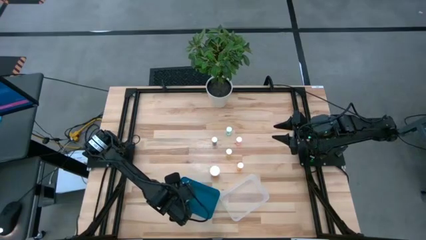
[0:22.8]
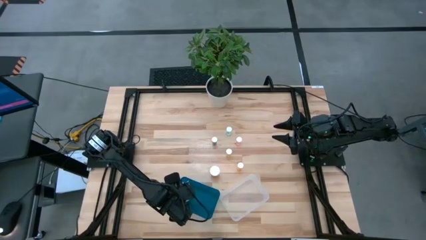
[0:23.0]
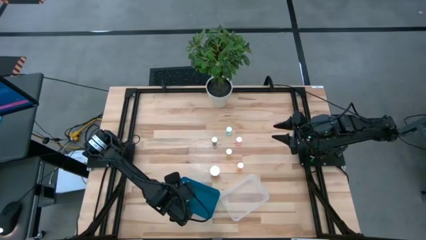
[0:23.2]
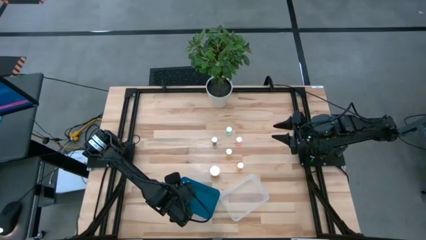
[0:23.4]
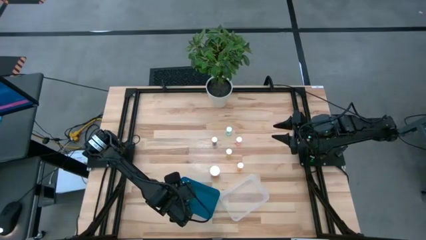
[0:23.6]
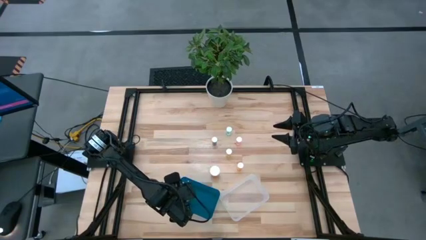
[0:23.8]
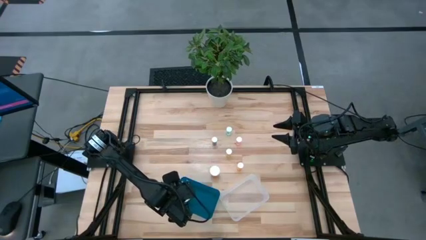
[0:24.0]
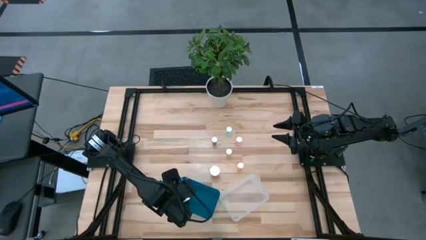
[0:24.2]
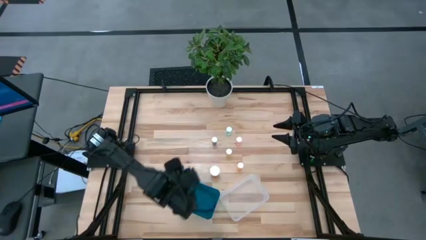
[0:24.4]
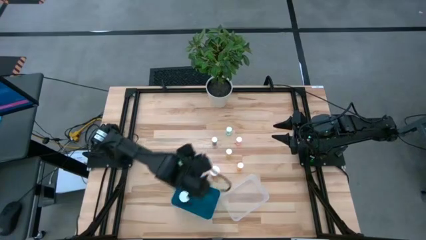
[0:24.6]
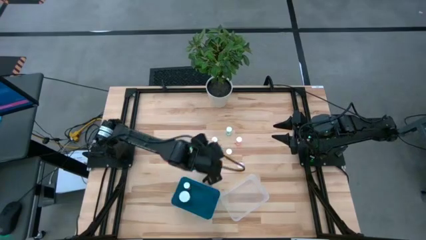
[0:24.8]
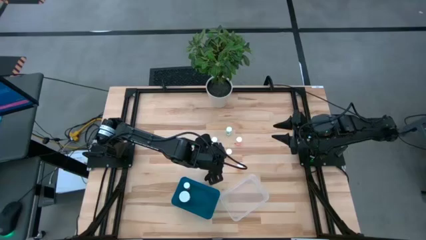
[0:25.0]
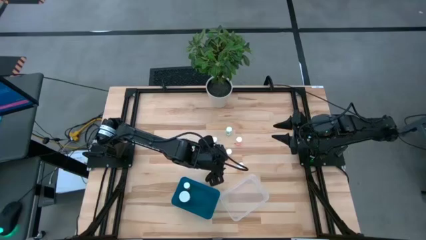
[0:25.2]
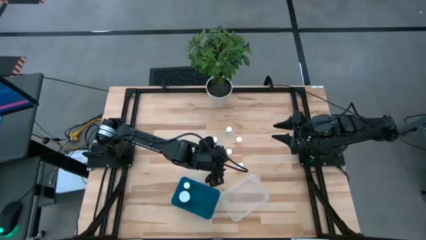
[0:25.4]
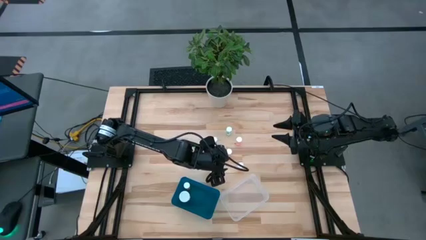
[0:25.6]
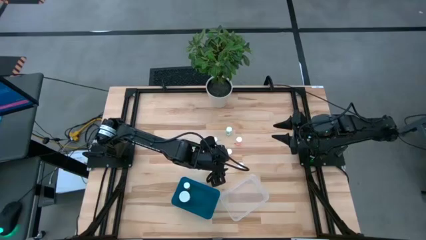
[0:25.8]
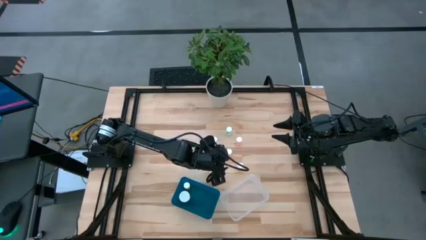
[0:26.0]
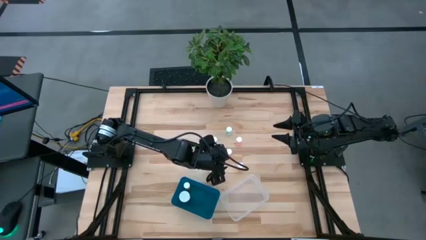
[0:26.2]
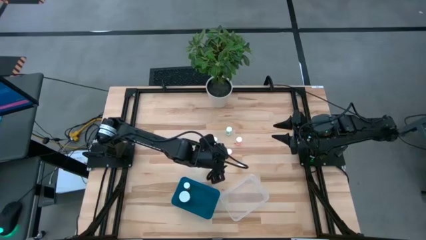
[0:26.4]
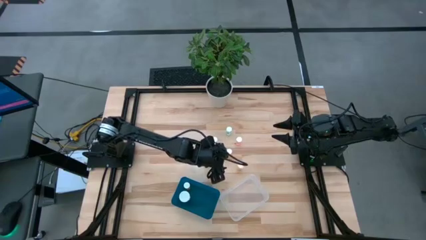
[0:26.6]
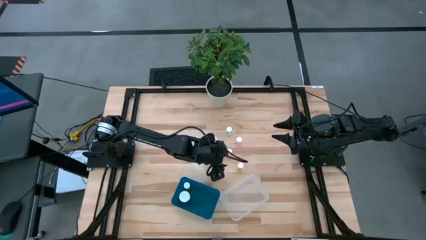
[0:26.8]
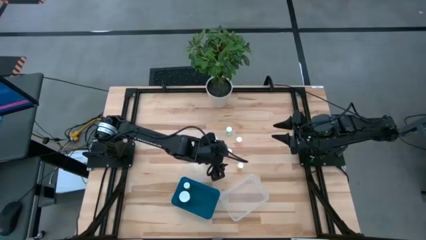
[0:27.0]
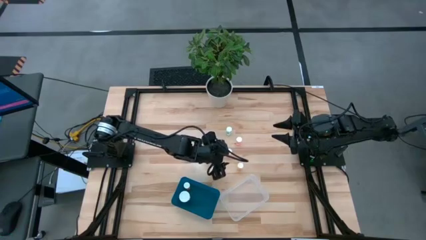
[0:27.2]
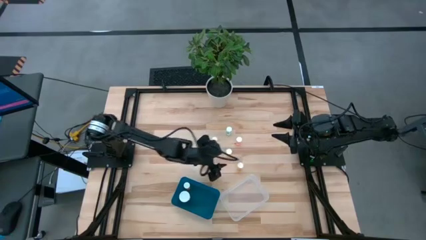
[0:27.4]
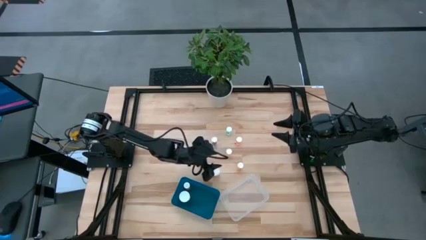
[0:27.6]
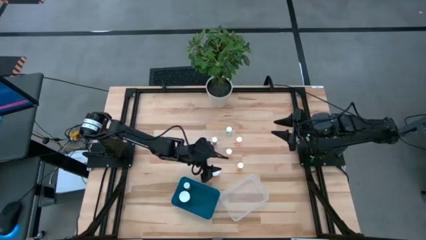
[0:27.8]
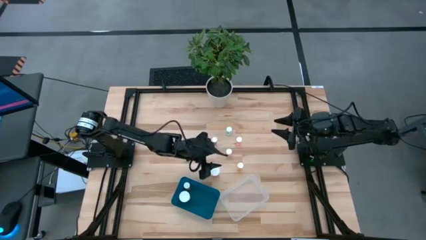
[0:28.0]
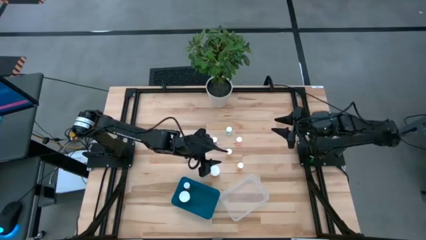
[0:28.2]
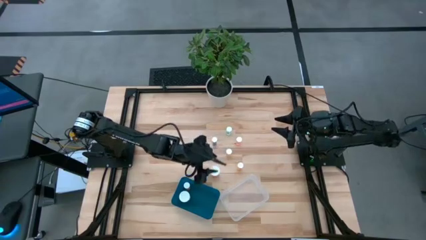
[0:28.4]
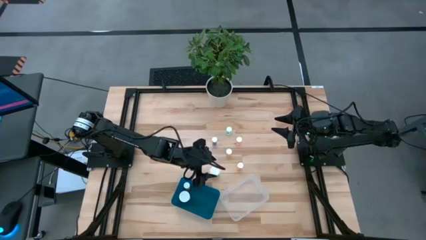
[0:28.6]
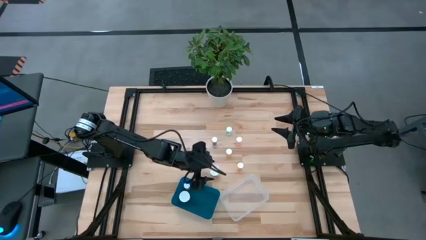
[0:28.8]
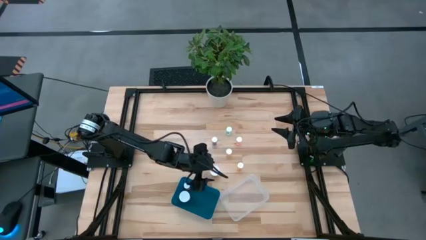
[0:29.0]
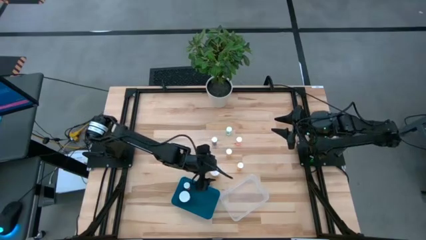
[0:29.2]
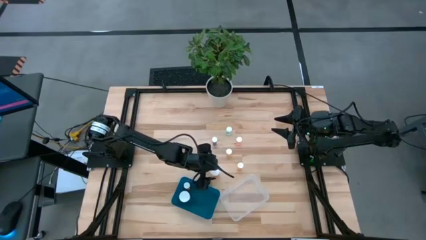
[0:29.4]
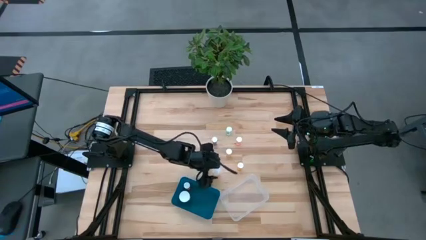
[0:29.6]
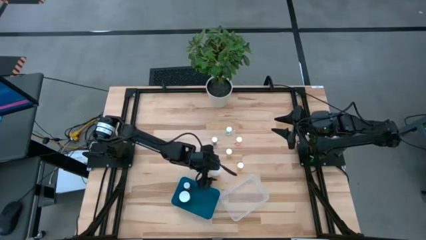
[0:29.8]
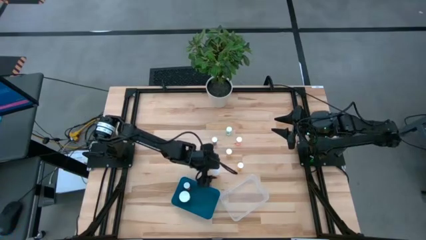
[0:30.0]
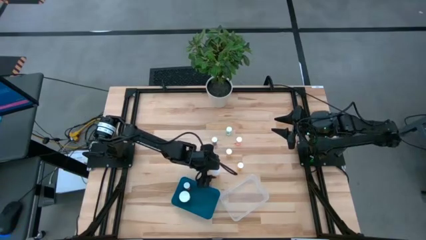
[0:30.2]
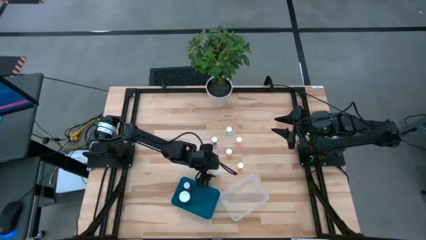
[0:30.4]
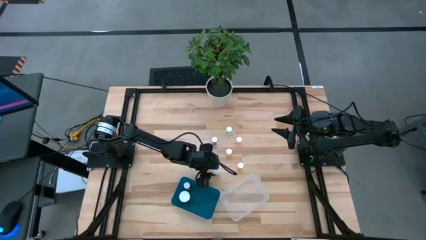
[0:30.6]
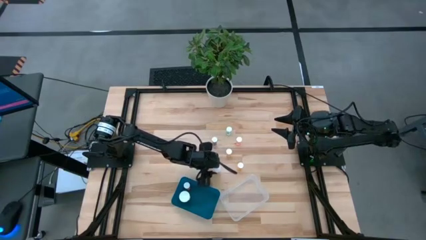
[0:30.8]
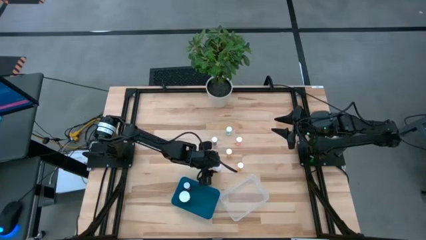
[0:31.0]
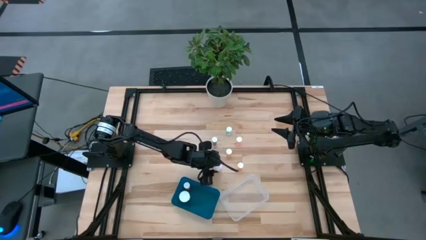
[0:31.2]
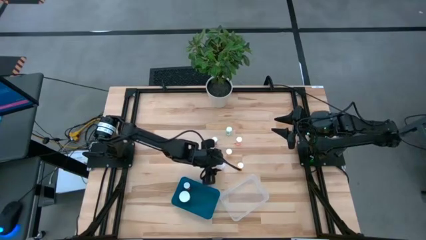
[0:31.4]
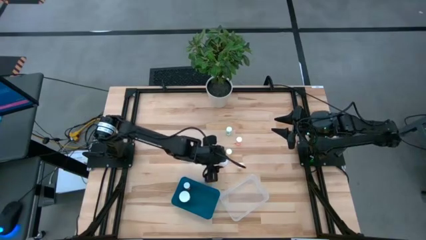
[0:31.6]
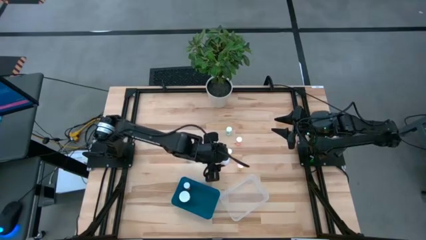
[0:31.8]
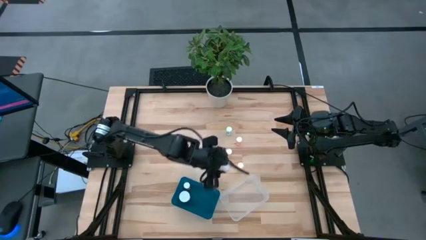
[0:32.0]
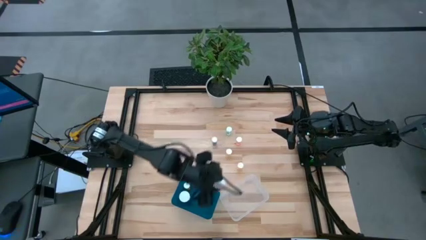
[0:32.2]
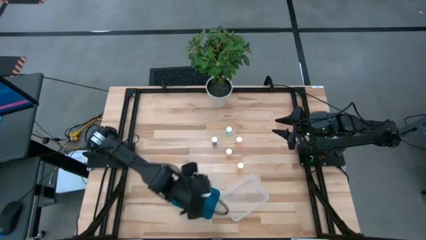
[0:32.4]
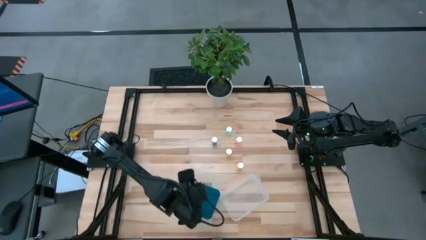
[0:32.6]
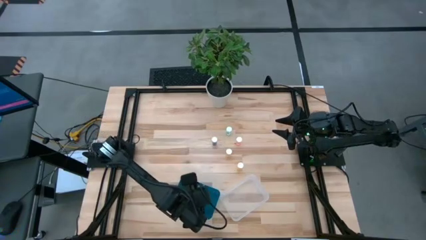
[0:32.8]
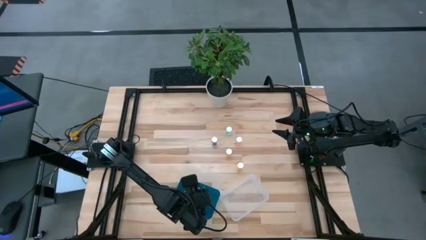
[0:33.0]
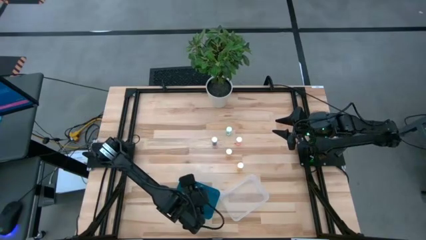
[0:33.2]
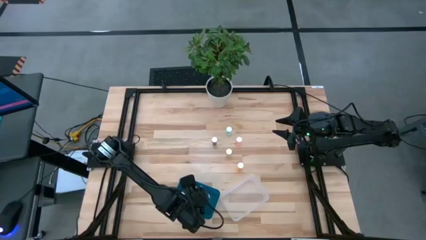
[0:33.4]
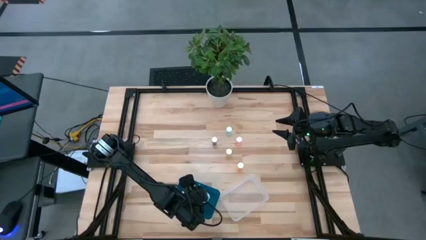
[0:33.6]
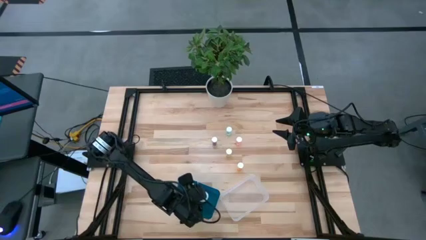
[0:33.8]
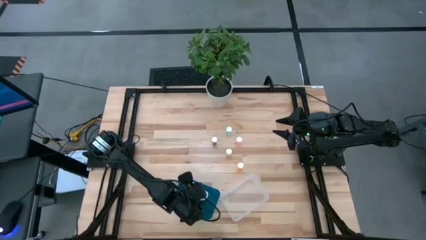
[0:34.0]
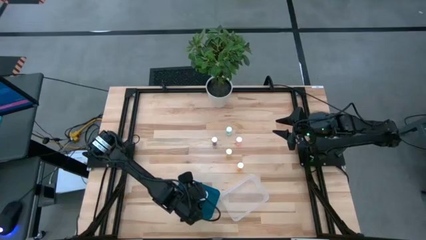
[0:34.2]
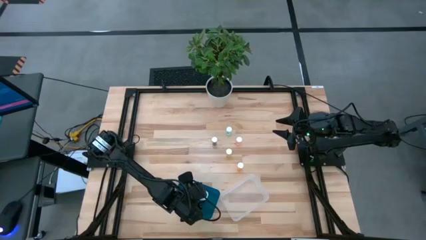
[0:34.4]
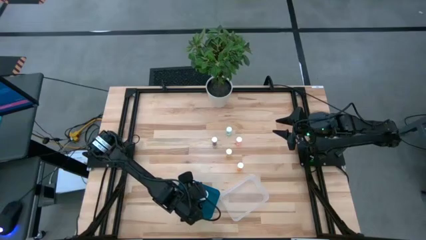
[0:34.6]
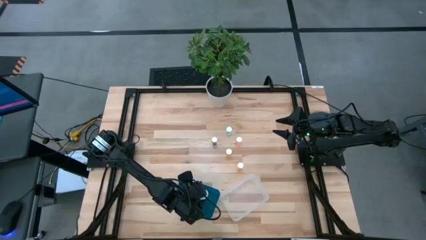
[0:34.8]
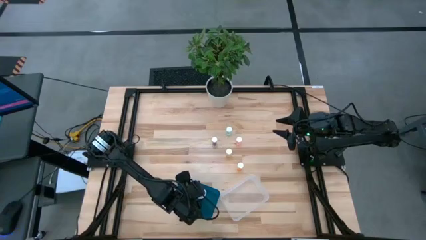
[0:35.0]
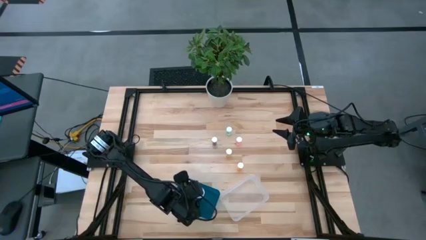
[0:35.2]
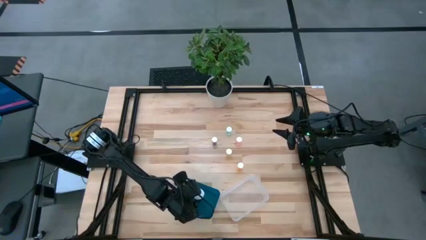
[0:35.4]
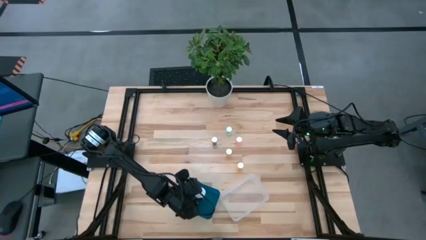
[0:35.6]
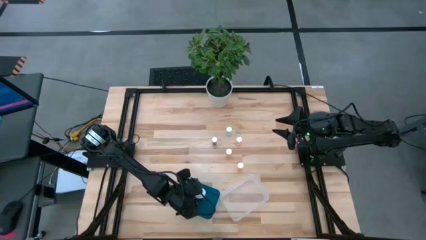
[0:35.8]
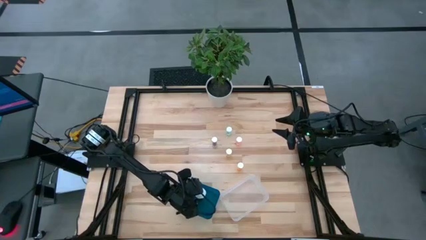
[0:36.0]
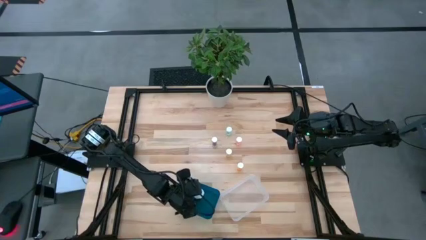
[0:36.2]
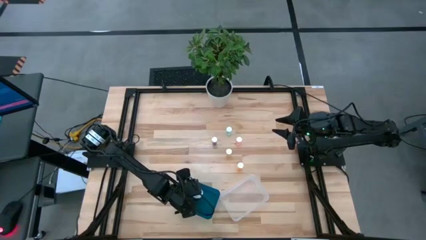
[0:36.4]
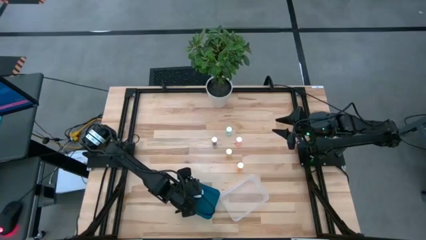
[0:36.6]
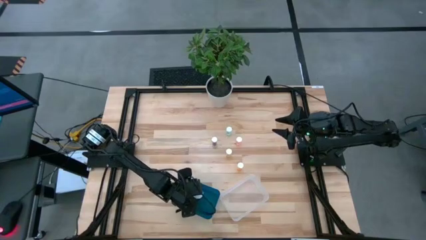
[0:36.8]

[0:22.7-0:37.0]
Task: Pick and place medicine bottles into bin by pill shape (circle, oval)
Put the large orange pill bottle into the blue bin

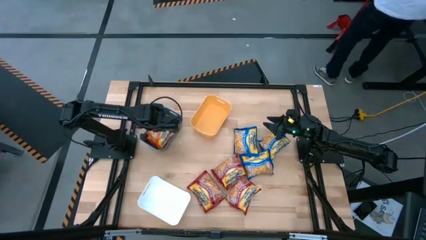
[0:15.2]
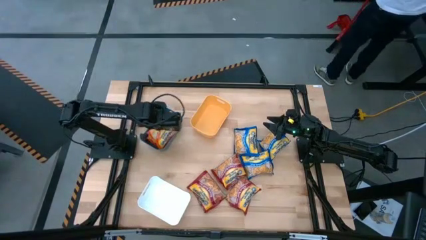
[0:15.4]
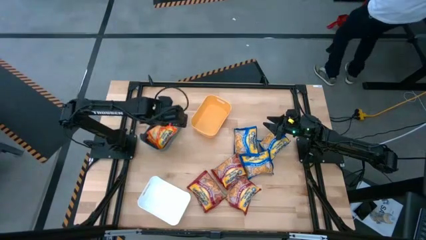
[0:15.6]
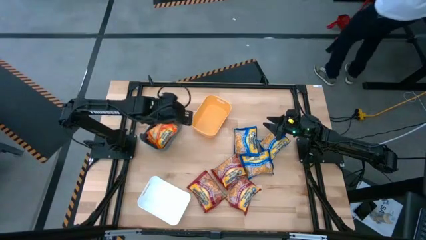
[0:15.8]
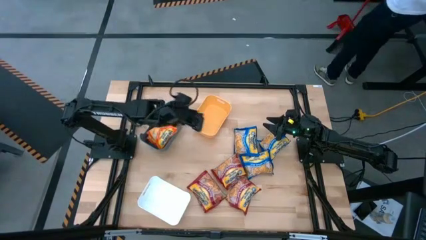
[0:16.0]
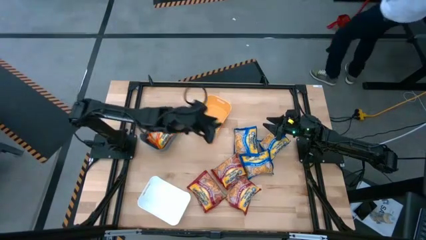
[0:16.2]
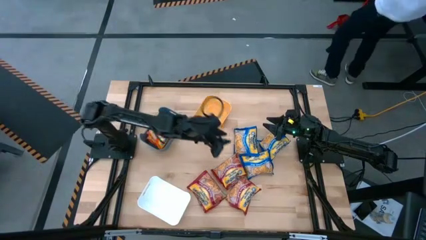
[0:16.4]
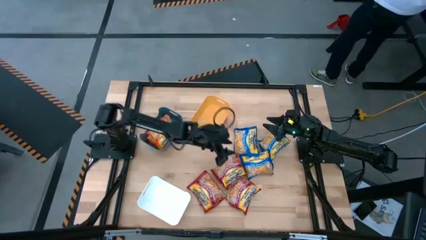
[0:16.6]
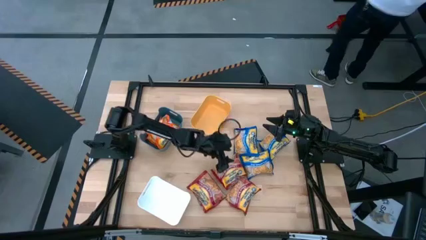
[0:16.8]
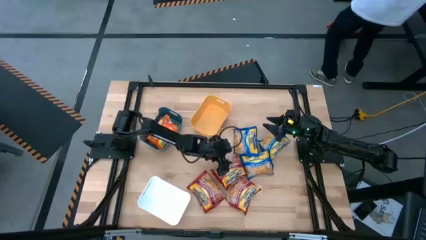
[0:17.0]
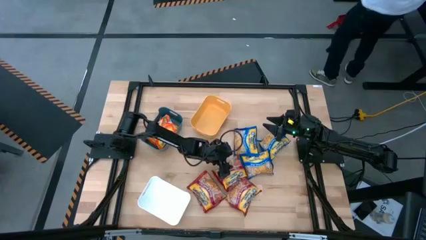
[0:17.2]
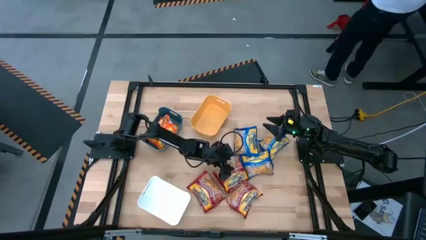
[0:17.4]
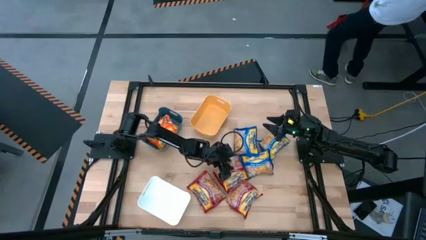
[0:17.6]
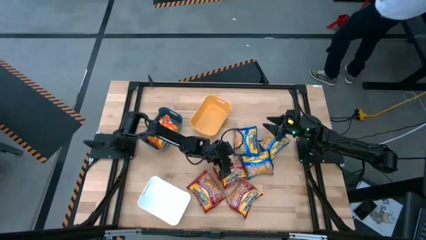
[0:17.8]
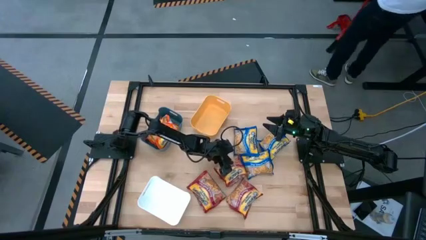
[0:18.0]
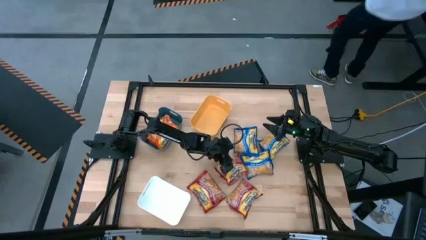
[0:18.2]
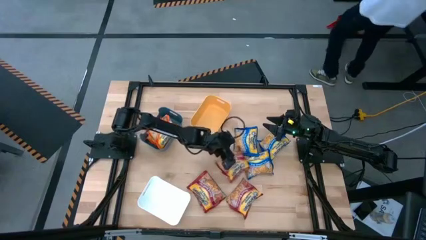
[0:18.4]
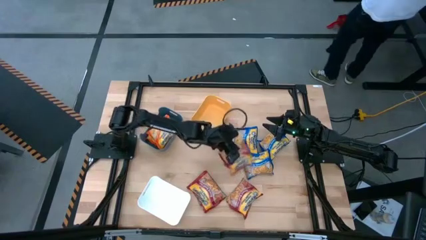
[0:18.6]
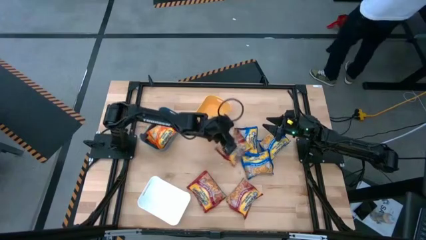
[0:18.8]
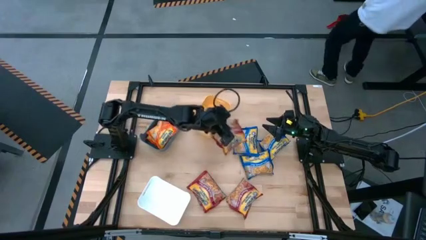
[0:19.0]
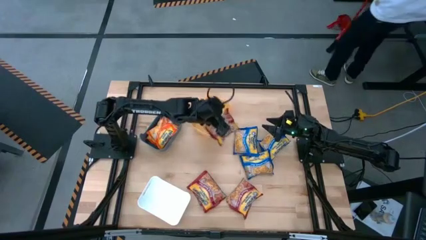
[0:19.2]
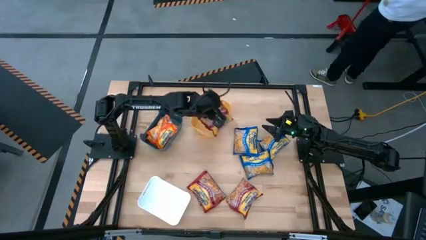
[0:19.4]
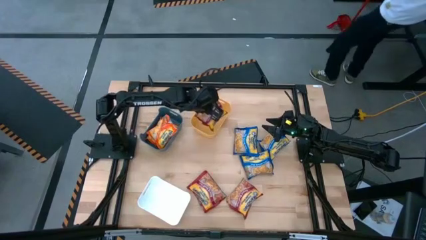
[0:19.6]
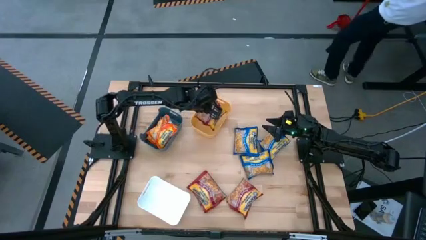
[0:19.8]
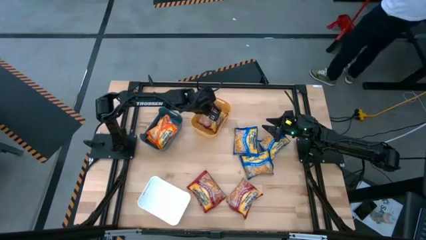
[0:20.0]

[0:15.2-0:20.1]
Task: Sort Maruchan noodles
Put the top red noodle pack into the yellow bin
